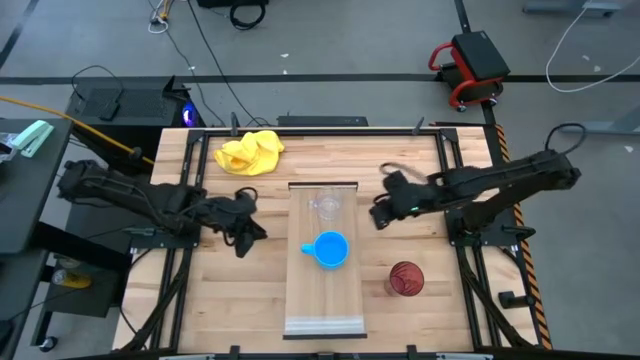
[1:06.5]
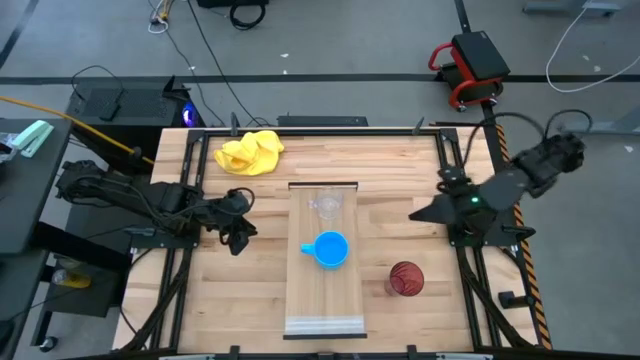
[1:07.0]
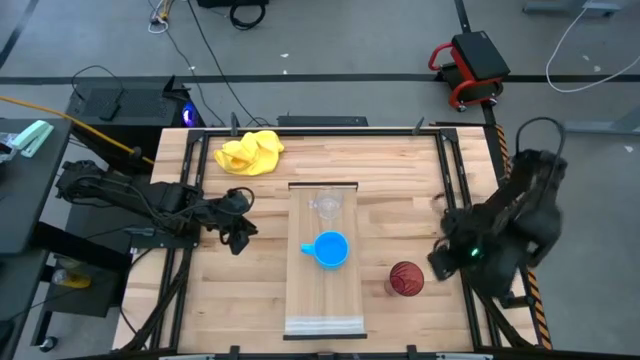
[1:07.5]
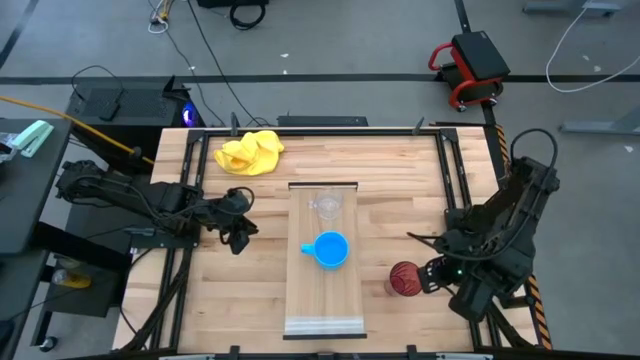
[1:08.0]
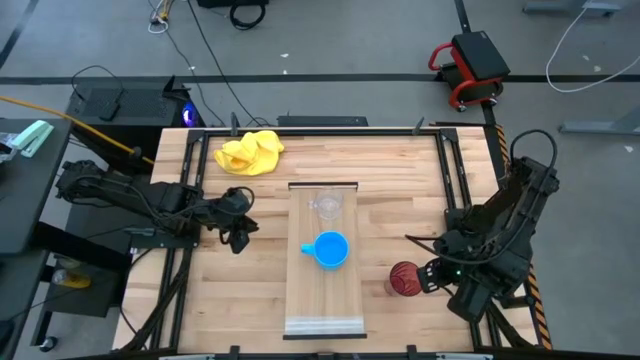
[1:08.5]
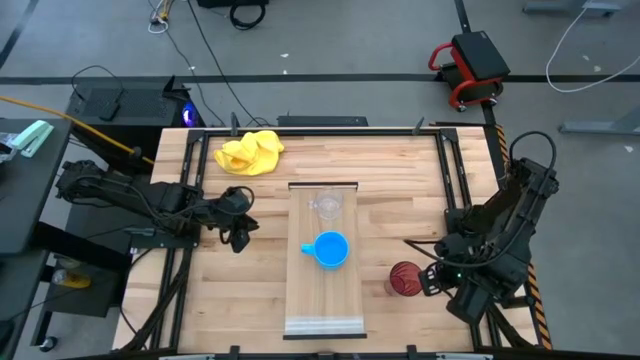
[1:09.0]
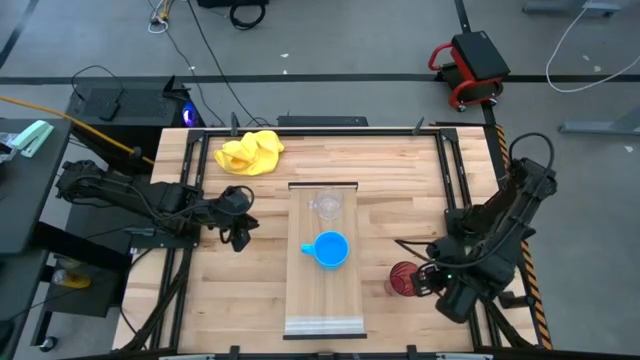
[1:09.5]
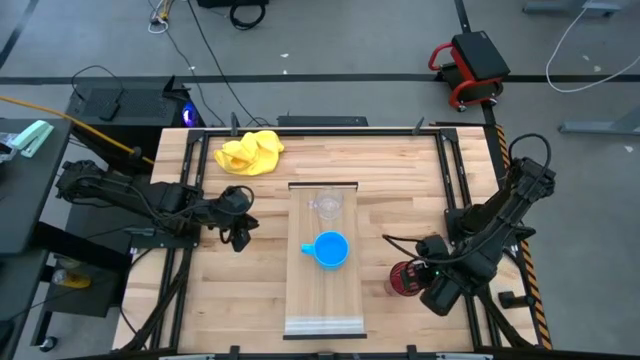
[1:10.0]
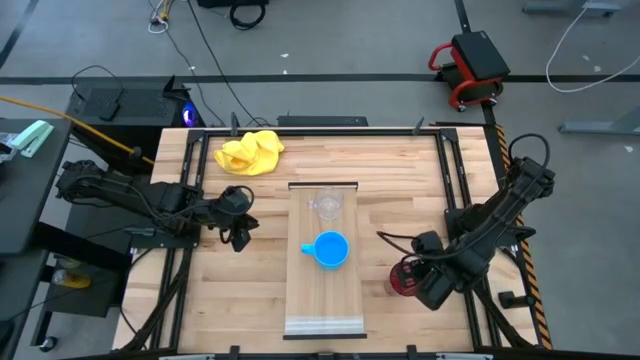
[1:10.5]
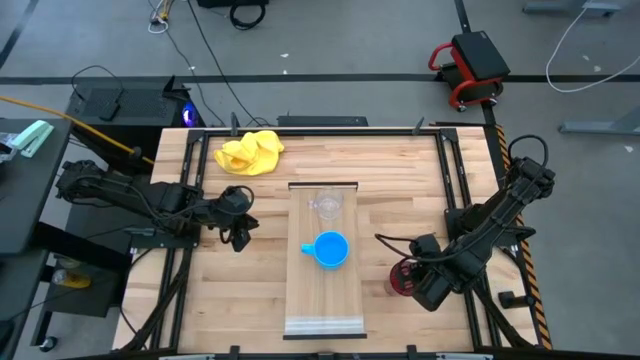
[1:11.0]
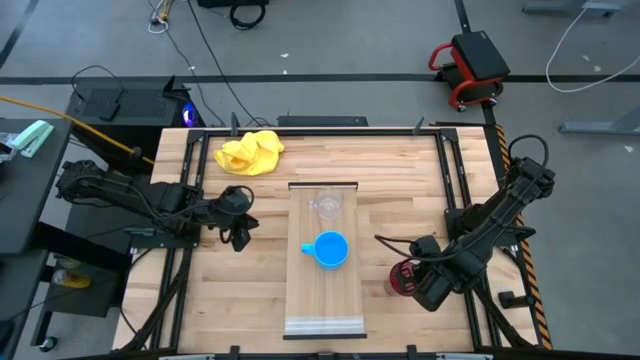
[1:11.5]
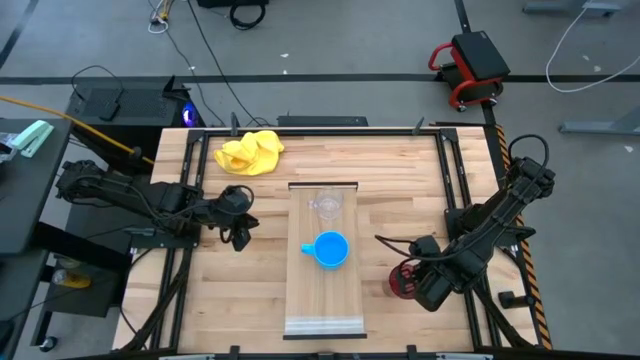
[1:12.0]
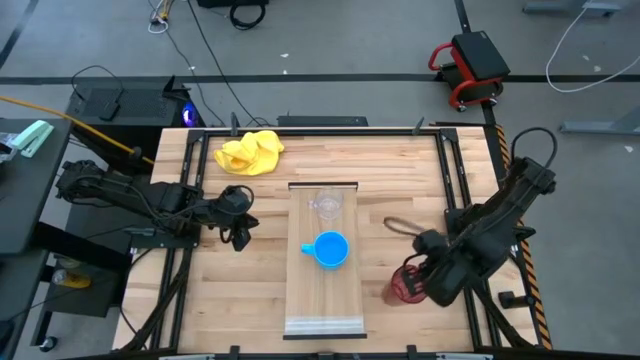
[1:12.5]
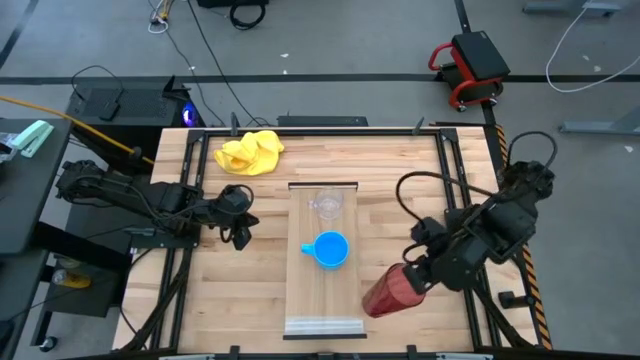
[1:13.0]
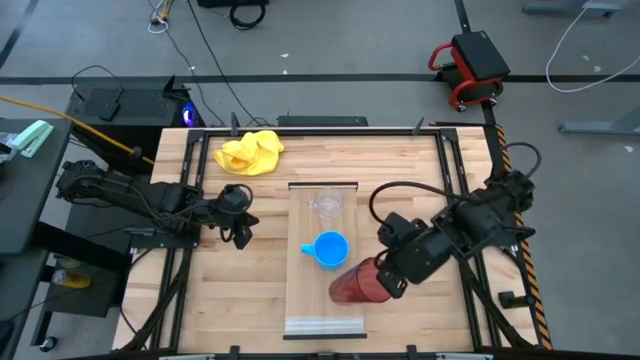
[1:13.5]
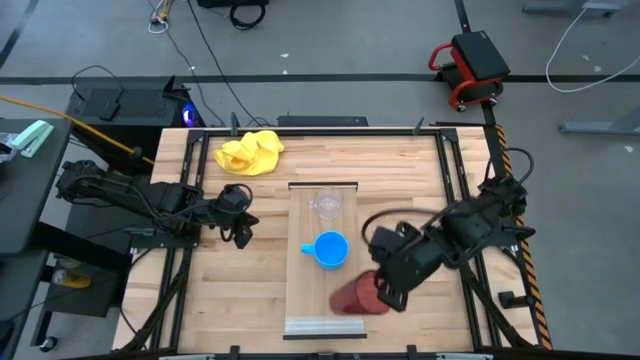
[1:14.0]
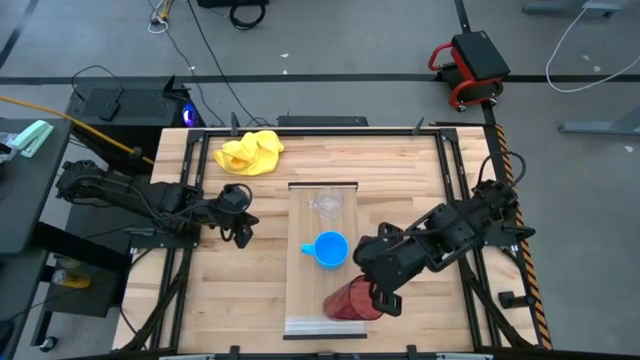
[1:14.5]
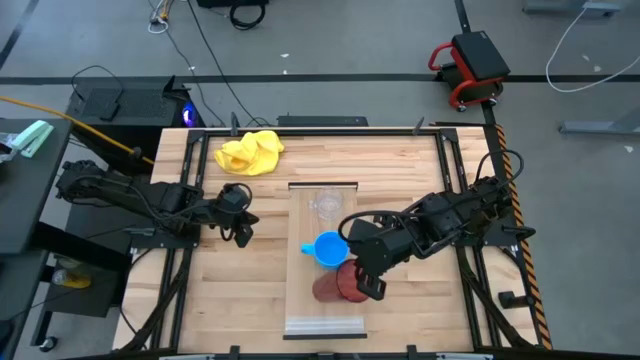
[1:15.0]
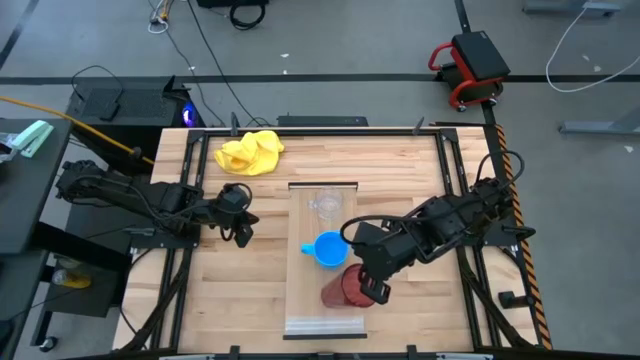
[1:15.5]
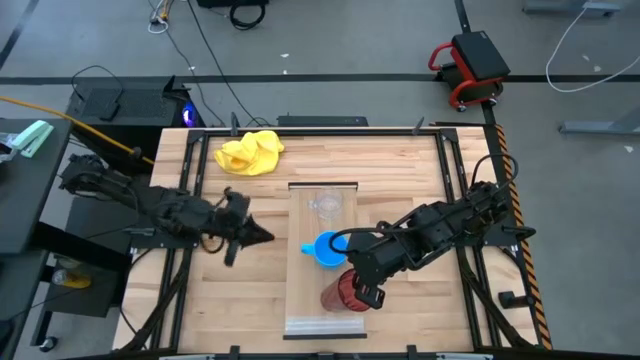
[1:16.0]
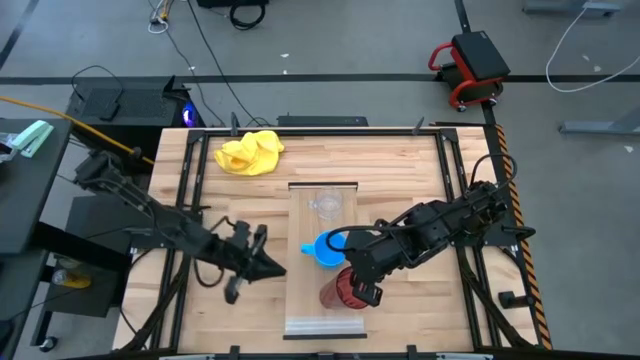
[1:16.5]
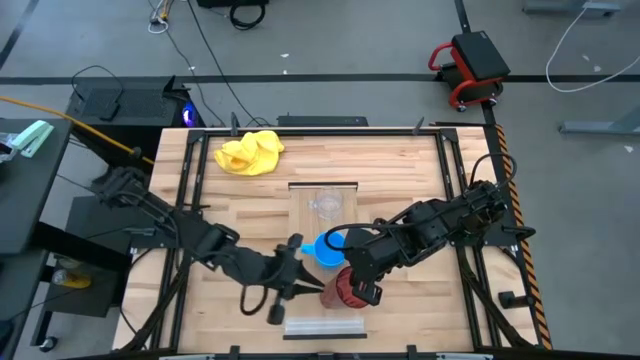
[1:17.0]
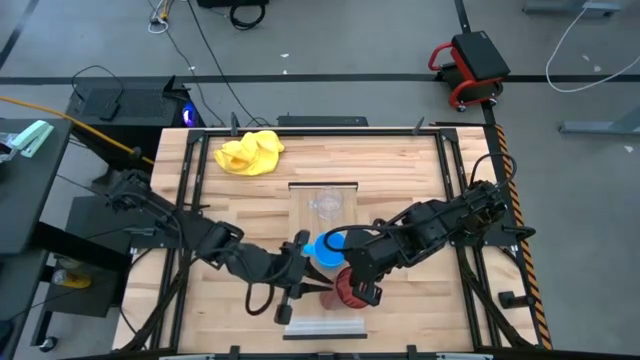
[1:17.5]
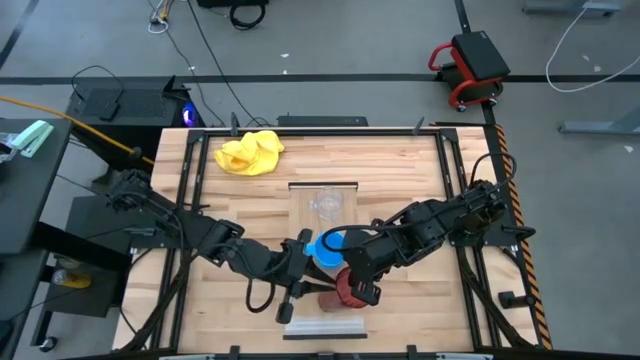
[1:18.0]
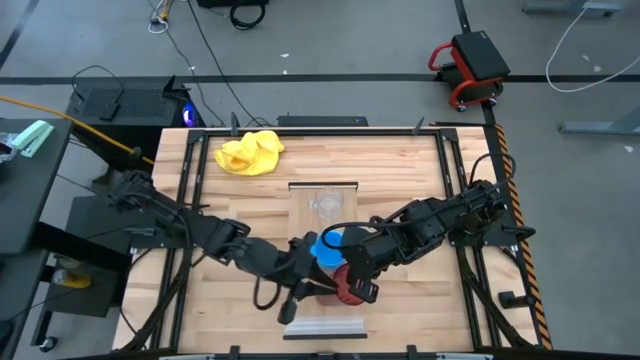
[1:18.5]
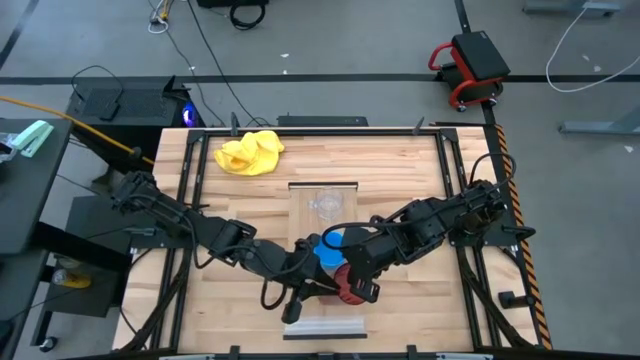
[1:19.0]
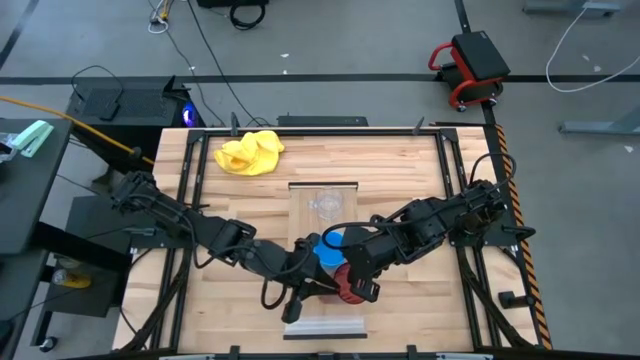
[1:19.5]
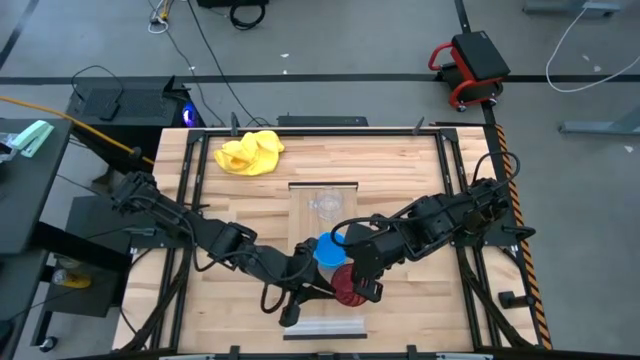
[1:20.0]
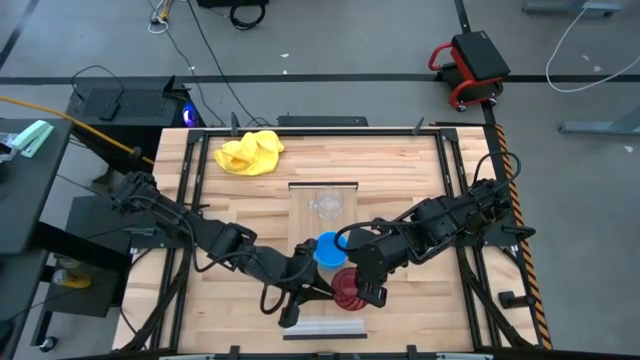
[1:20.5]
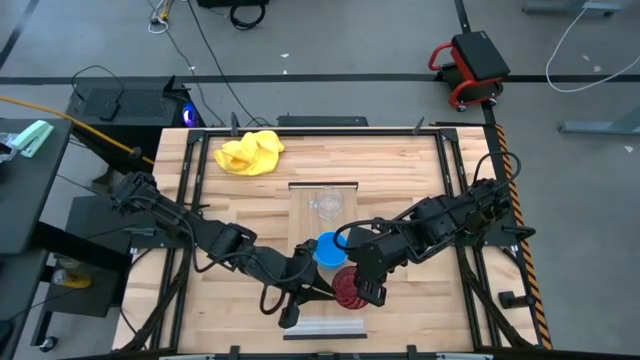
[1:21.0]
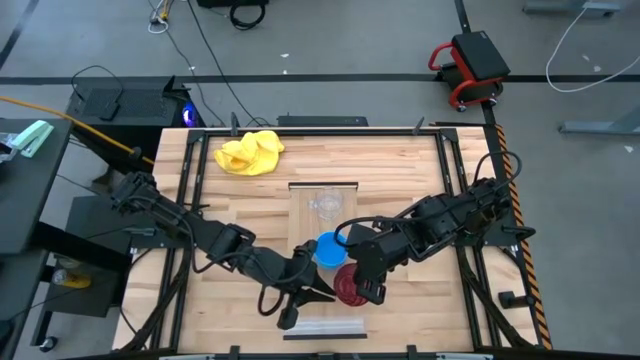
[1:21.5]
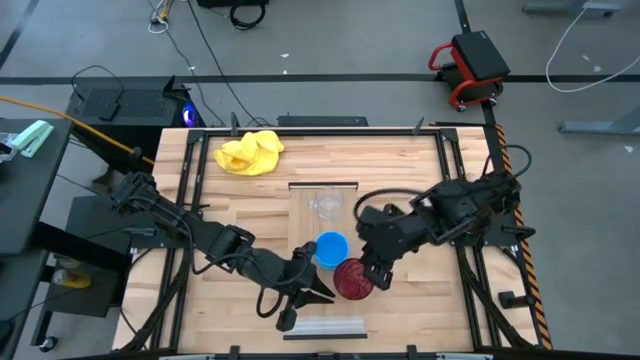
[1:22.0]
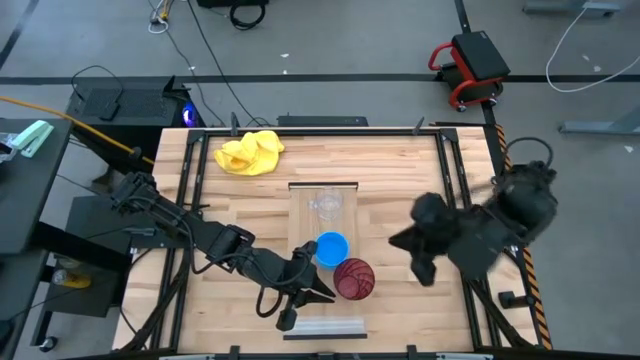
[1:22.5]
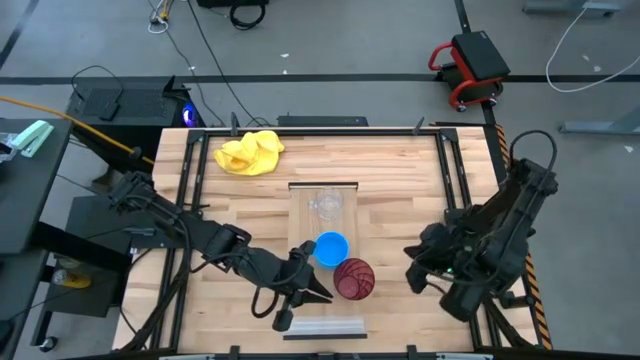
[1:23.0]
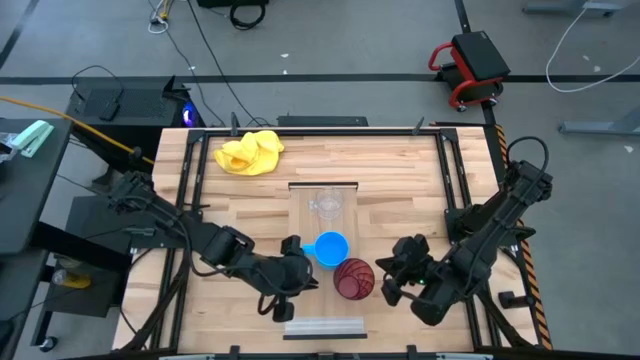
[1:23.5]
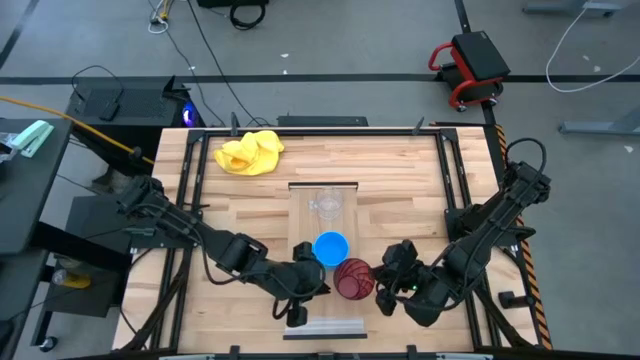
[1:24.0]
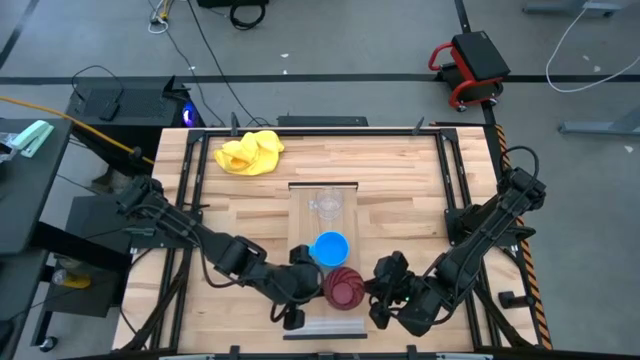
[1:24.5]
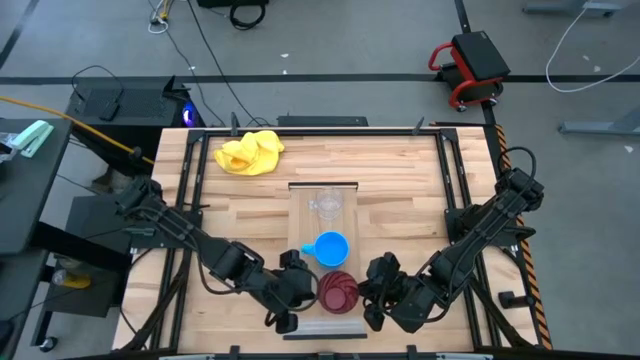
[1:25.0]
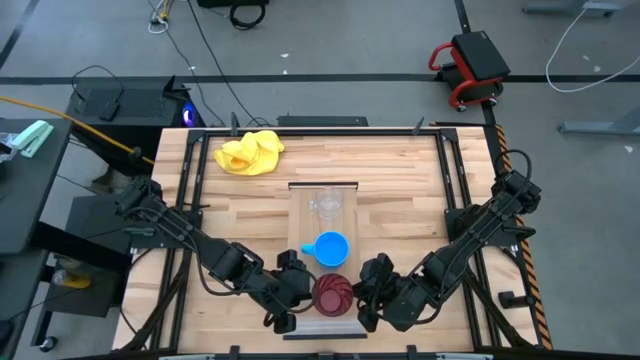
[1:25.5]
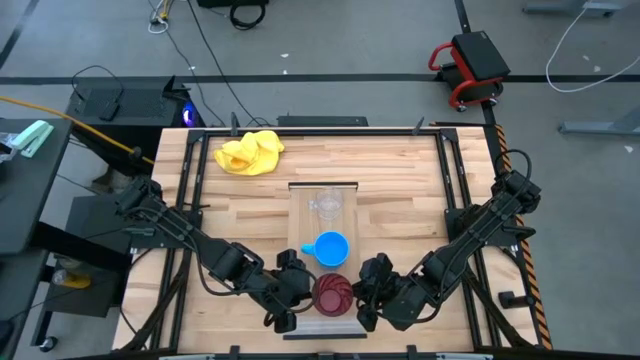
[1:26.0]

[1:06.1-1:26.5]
Task: Stack small to large cups/mugs on shelf
Put the red cup on the shelf
